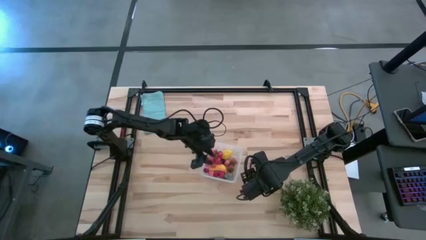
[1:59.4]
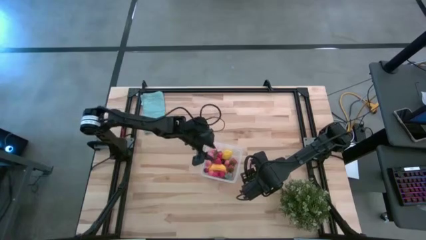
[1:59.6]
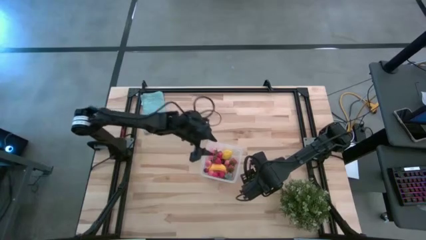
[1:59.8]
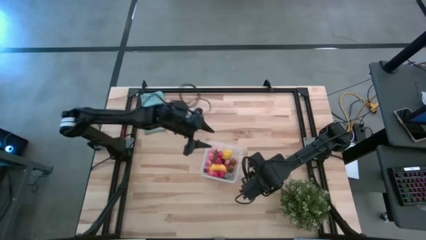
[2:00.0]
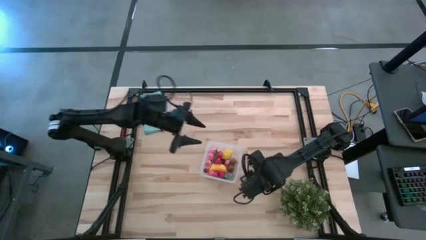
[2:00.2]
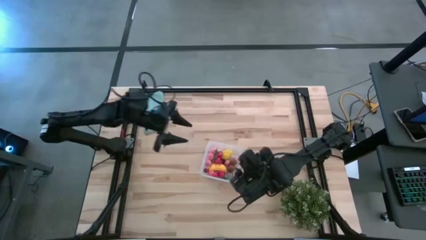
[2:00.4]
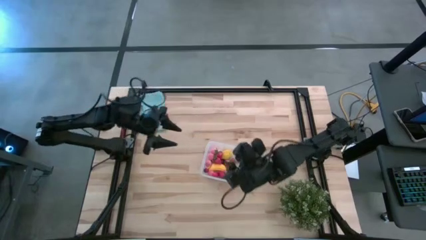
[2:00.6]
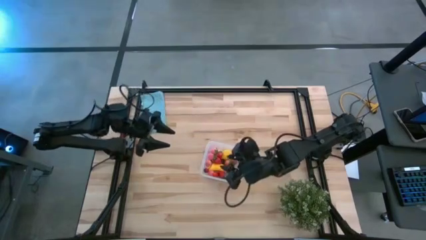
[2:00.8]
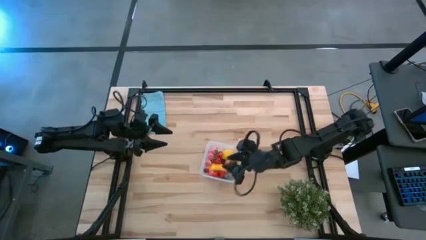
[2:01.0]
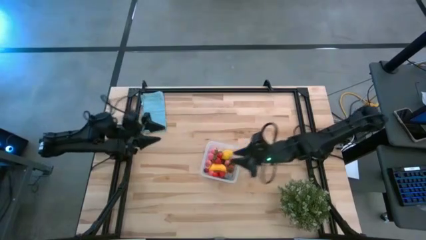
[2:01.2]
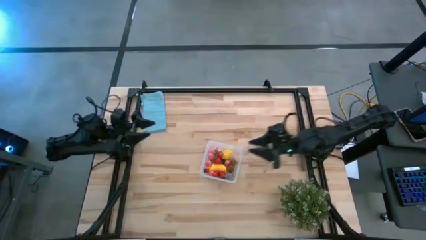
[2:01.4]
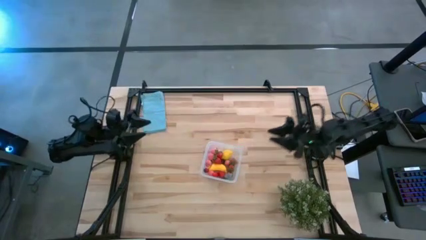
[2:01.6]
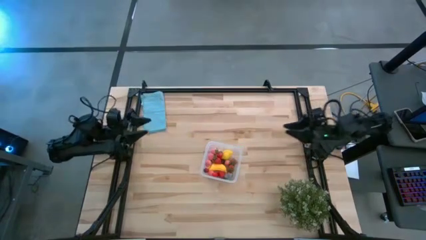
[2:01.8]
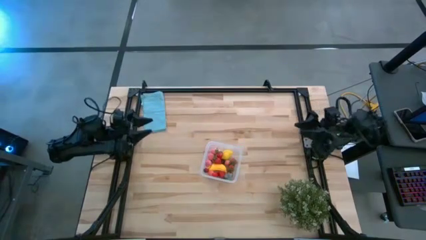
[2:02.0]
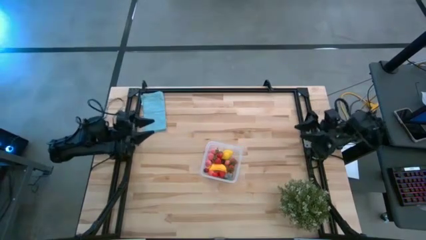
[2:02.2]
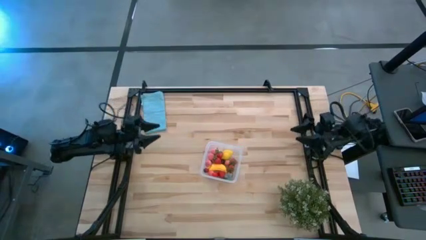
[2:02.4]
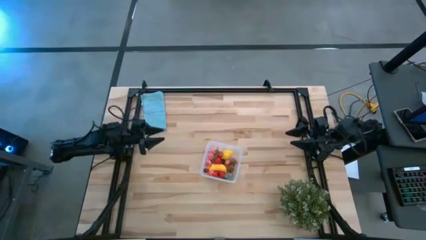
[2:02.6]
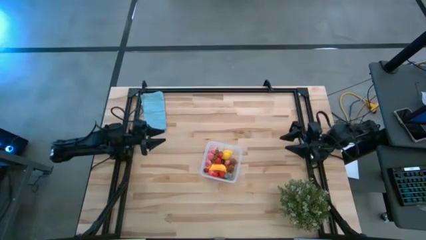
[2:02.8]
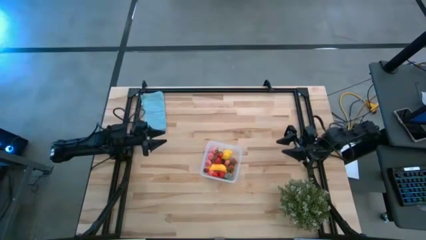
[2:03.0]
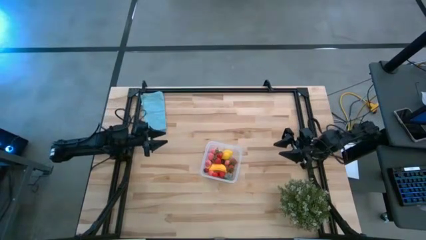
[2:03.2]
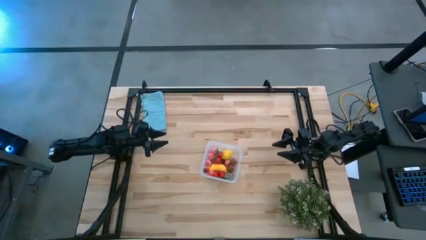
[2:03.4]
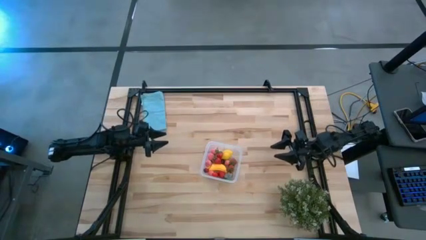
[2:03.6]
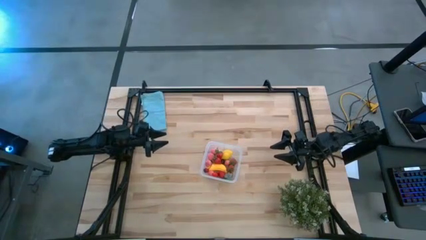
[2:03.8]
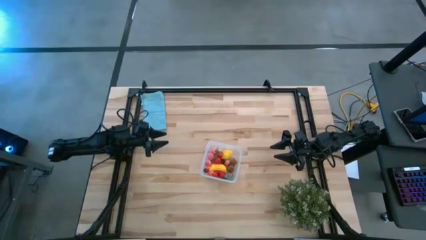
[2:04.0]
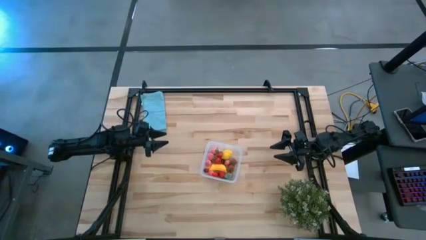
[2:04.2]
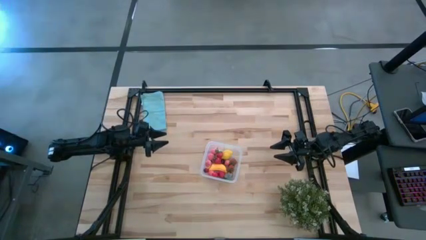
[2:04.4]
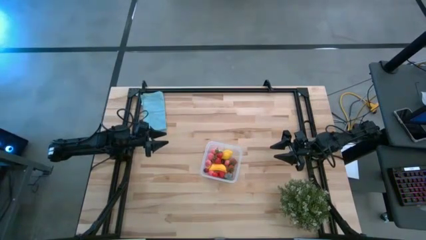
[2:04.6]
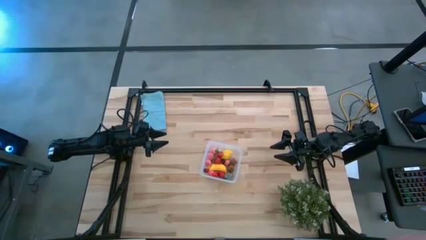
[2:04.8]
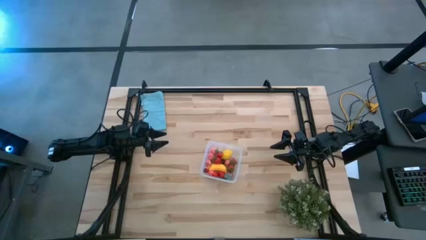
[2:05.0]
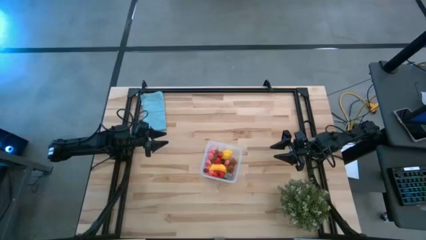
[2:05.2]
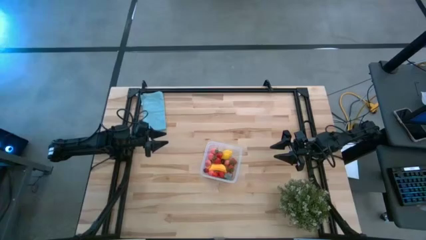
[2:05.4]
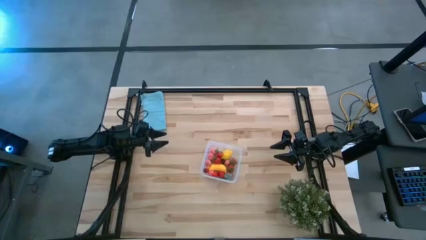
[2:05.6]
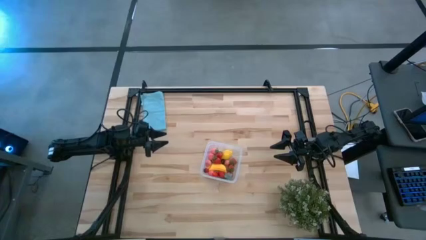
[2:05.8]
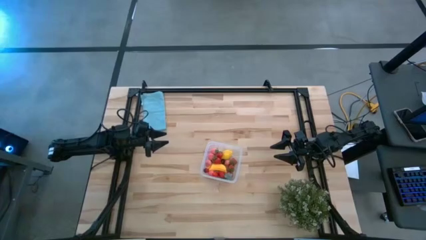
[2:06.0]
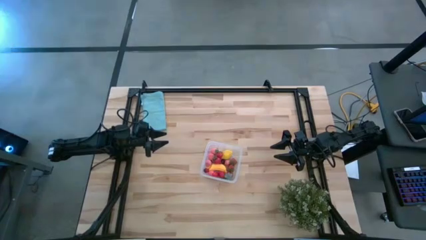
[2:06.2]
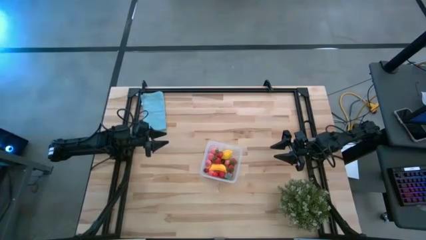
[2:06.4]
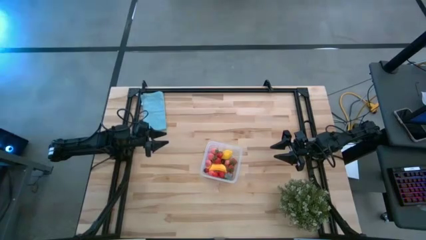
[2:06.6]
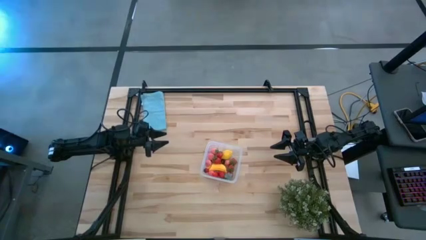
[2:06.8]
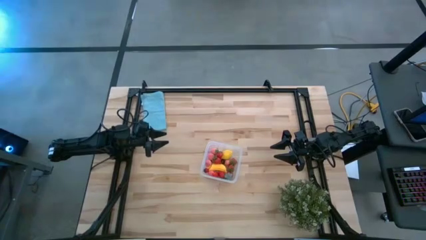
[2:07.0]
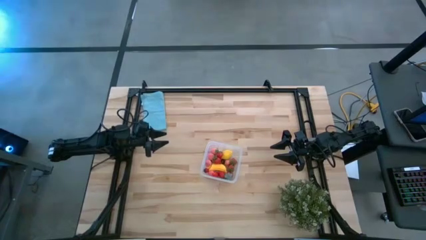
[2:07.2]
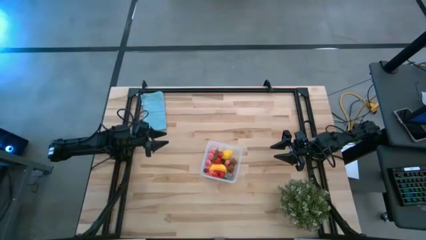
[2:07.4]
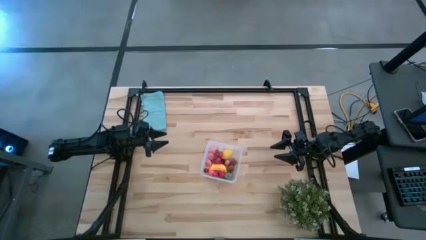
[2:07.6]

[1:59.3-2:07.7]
Task: Pick and placing Produce into tupperware
Return to Home Position

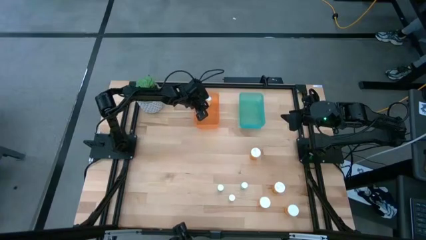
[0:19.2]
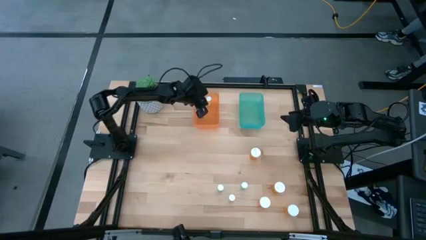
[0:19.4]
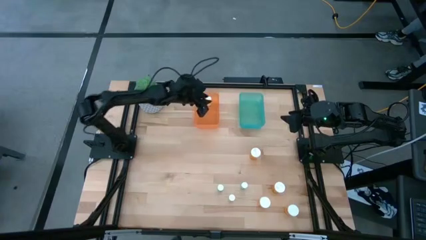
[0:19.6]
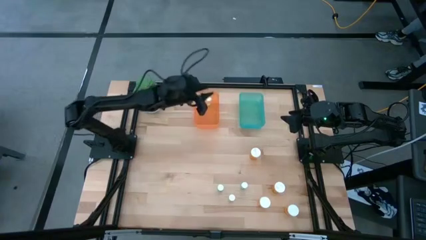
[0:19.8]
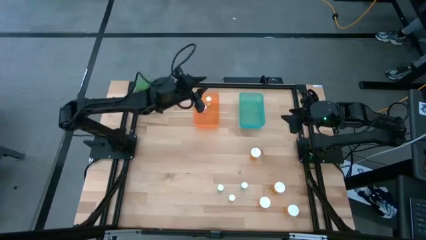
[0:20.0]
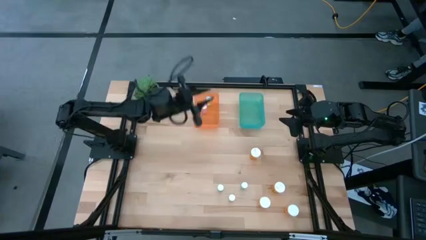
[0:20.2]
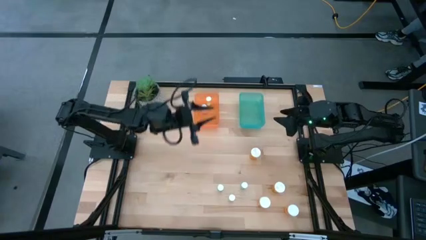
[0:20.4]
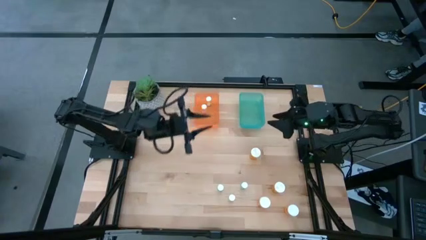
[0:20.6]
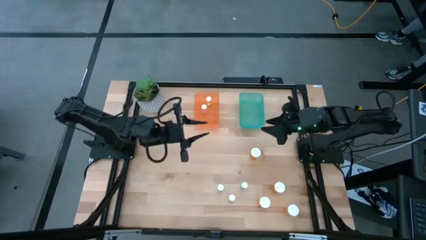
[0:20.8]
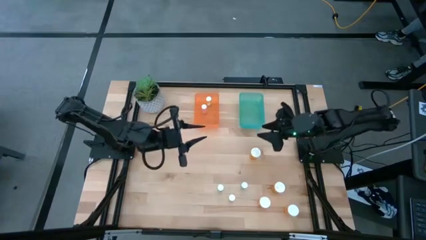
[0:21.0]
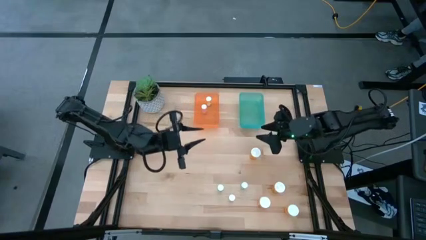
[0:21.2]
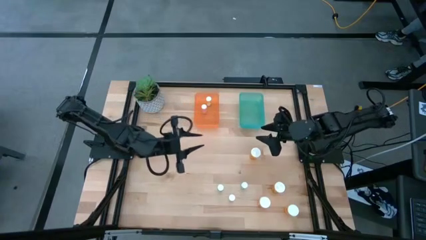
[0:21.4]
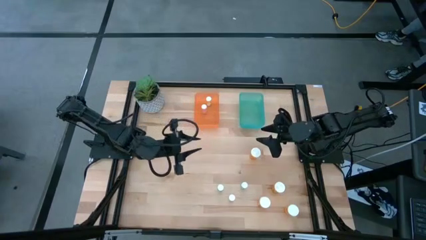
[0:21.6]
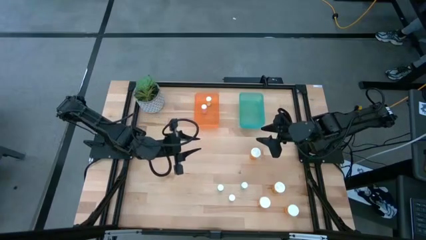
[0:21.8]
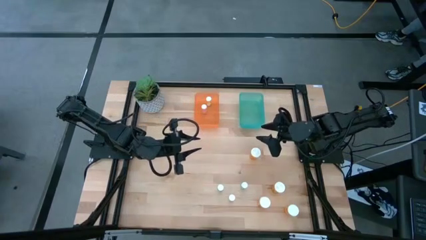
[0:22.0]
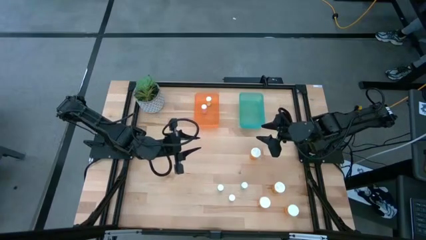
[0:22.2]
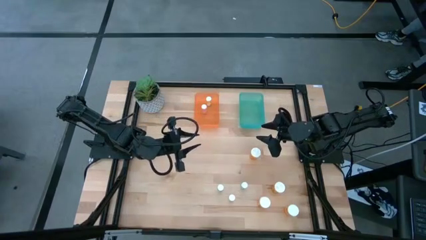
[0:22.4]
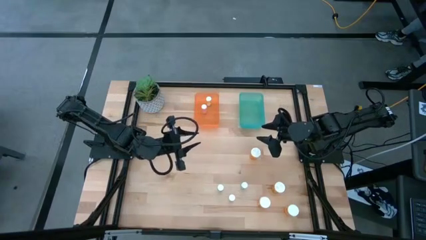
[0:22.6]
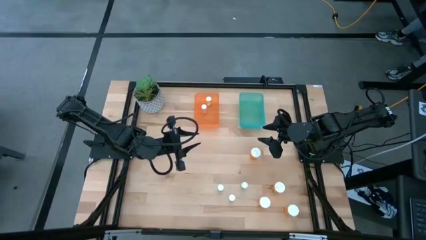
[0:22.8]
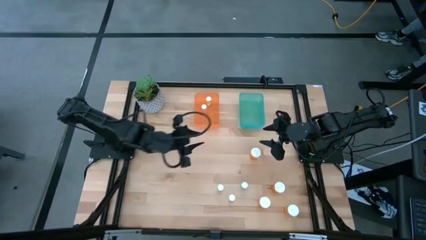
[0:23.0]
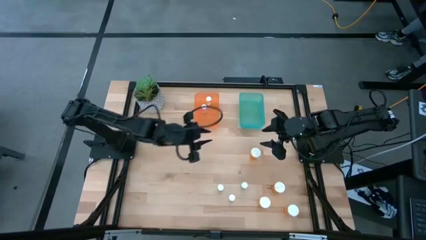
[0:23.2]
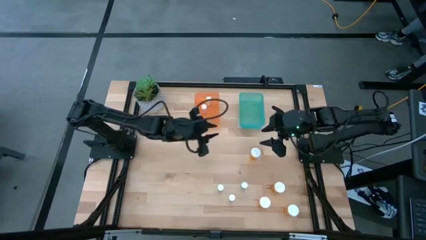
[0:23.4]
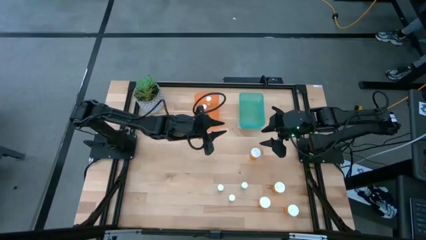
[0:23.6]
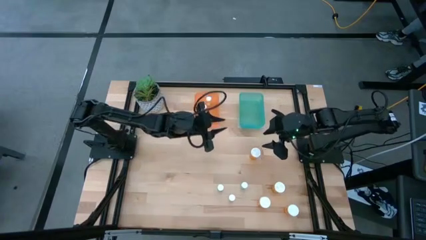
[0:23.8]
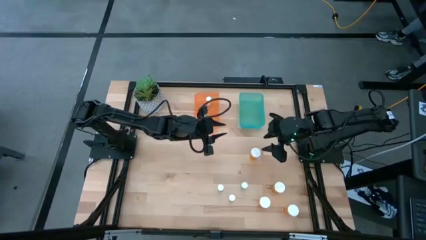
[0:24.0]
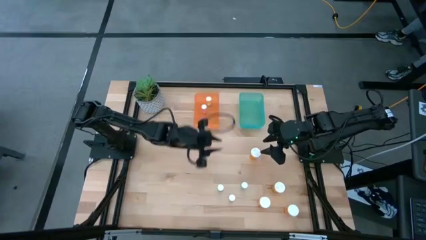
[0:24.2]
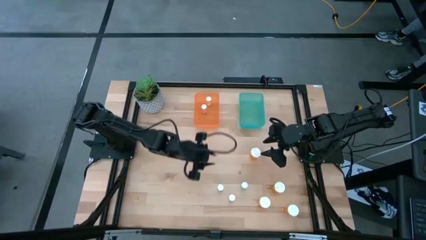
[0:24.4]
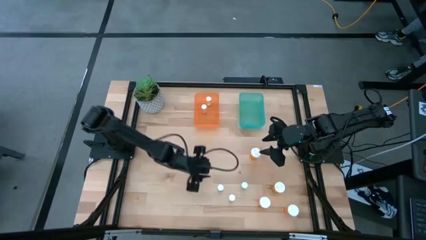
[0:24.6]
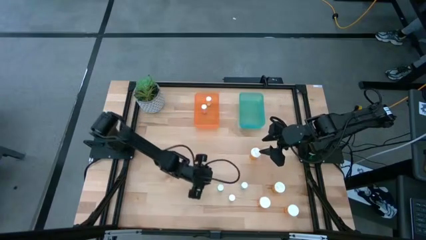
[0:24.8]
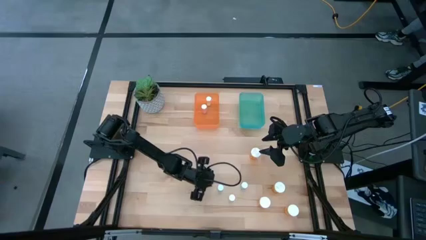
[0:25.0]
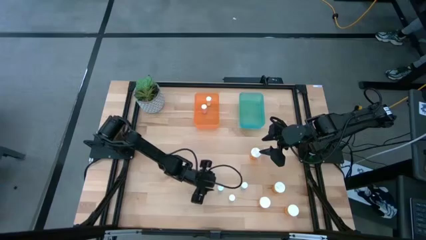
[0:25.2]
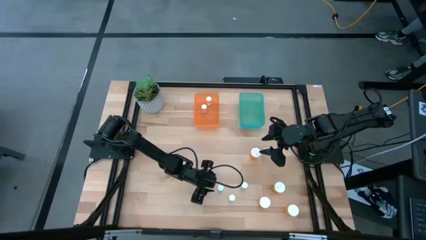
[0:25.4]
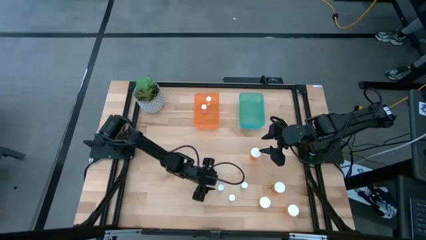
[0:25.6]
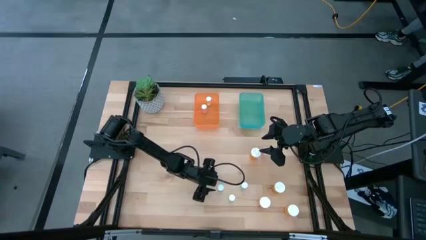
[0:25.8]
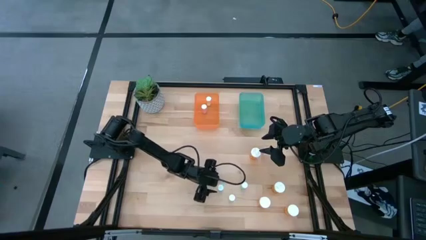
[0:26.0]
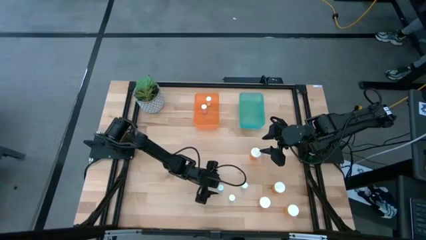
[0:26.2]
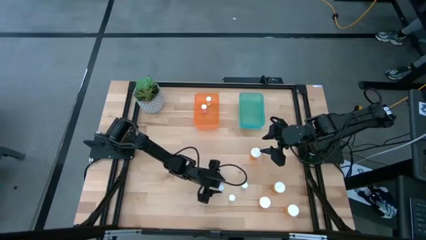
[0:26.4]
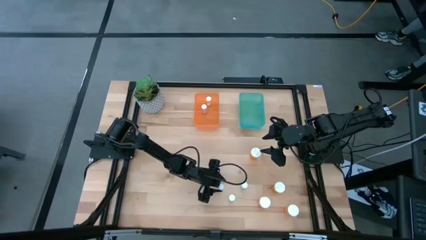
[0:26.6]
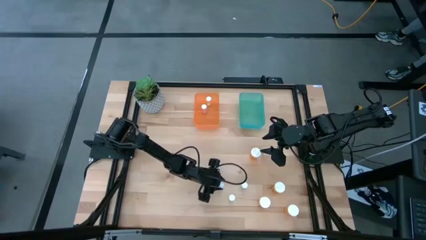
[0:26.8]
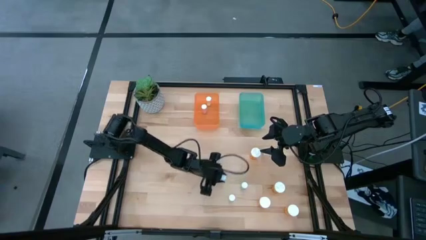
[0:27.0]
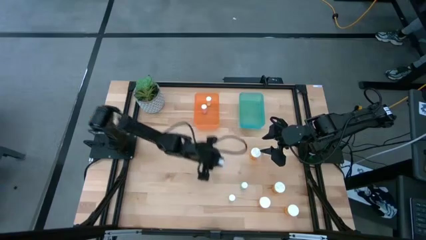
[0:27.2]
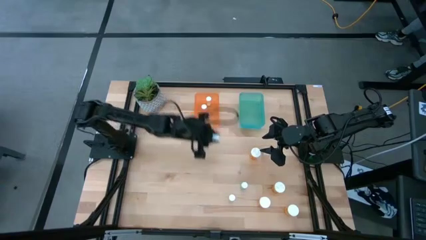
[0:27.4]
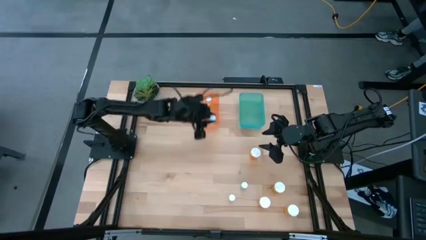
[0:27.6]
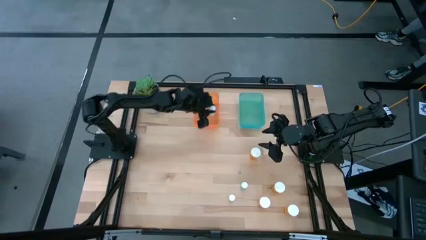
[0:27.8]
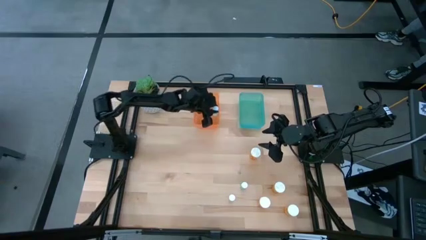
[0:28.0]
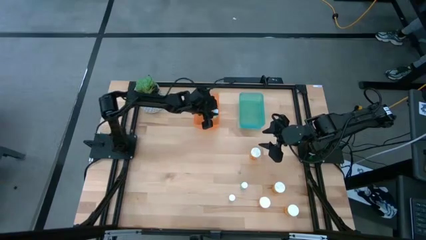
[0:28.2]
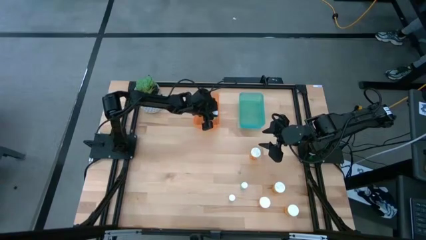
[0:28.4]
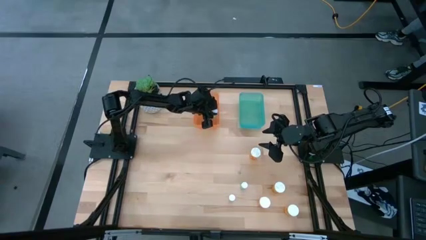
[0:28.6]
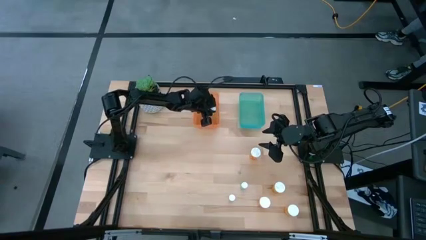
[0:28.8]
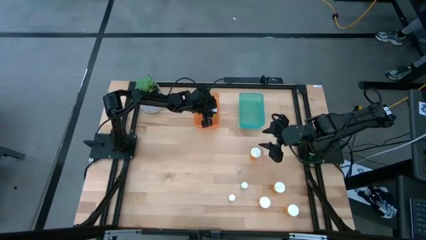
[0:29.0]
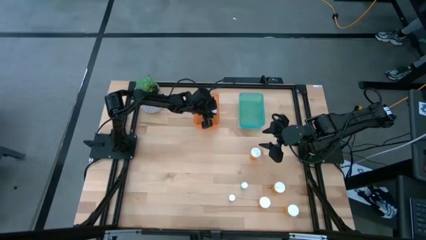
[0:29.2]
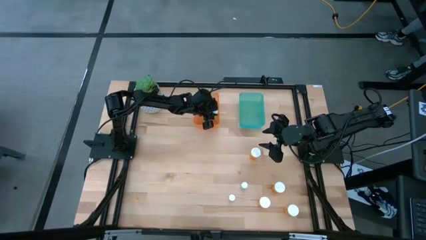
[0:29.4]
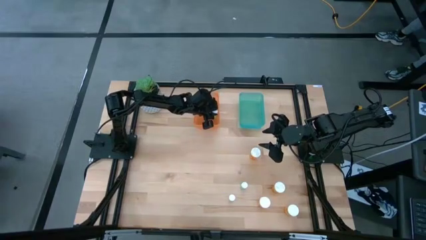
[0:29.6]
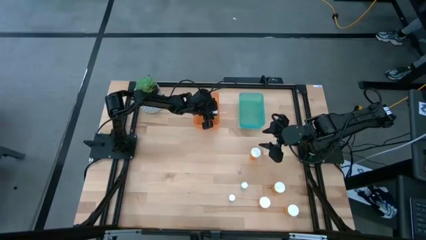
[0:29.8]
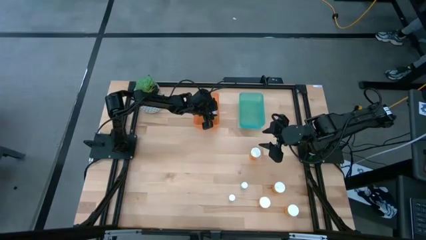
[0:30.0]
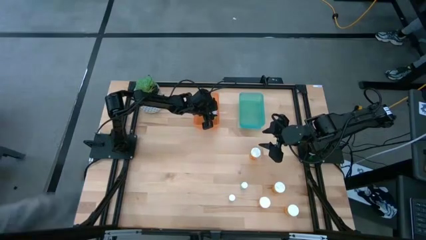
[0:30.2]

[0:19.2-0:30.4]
Task: Pick and place medicine bottles into bin by pill shape (circle, oval)
Put the small blue pill bottle into the orange bin
